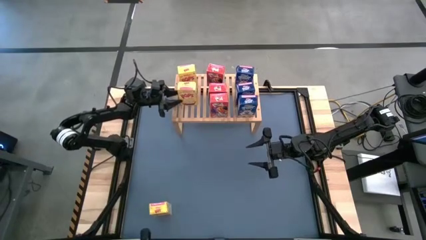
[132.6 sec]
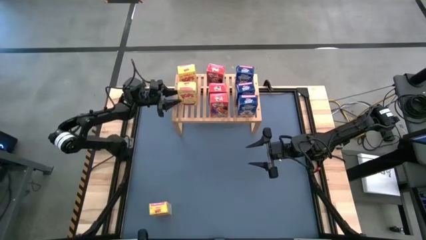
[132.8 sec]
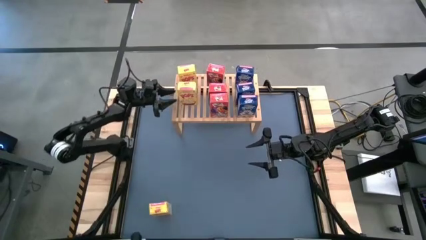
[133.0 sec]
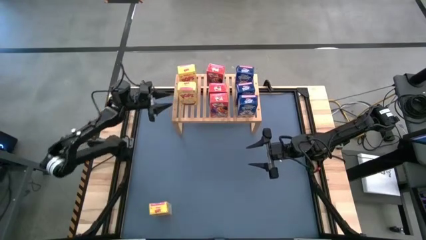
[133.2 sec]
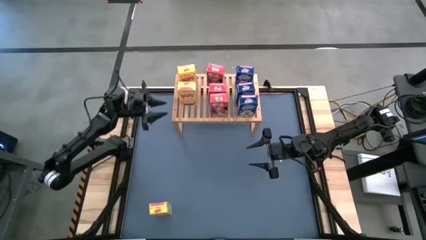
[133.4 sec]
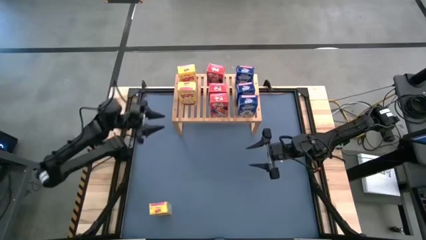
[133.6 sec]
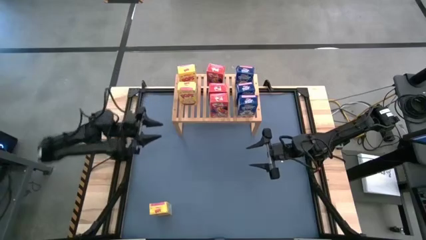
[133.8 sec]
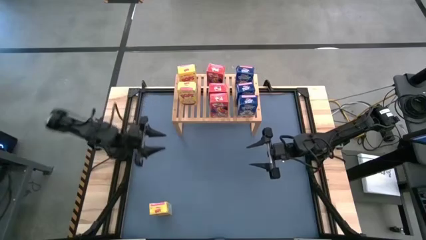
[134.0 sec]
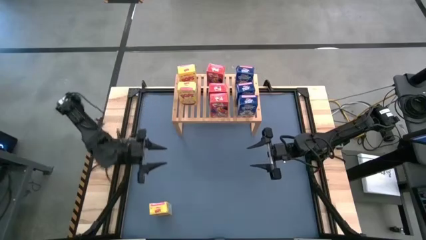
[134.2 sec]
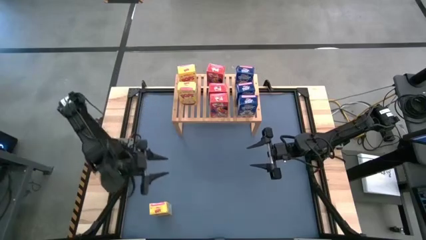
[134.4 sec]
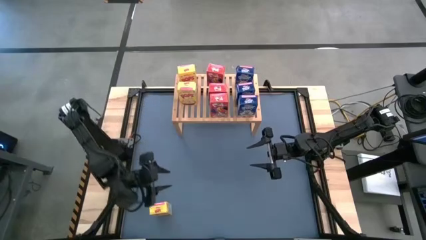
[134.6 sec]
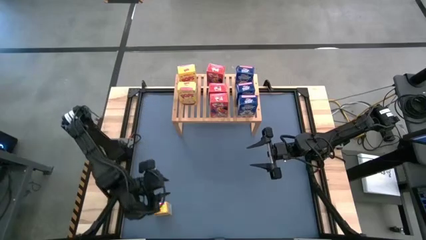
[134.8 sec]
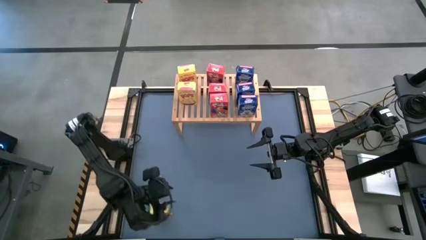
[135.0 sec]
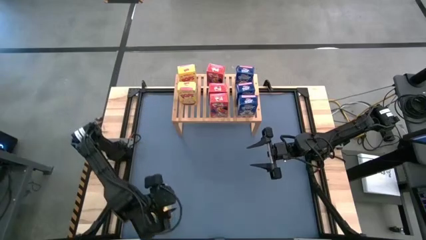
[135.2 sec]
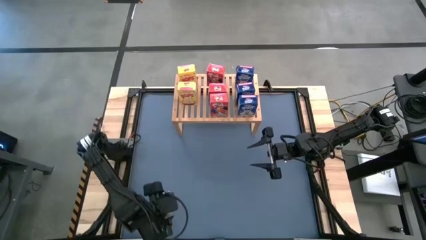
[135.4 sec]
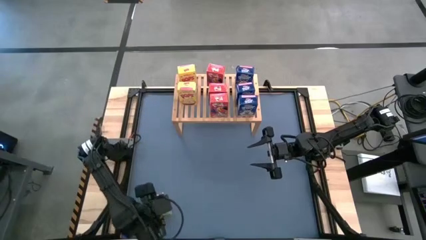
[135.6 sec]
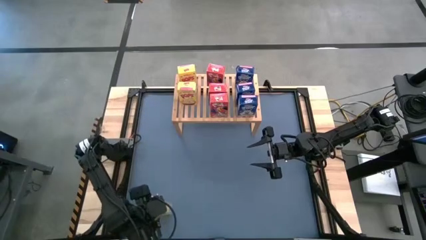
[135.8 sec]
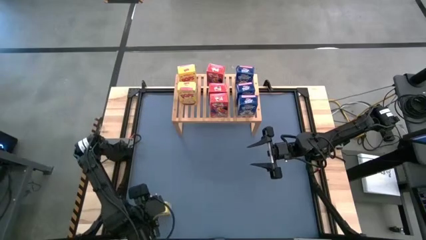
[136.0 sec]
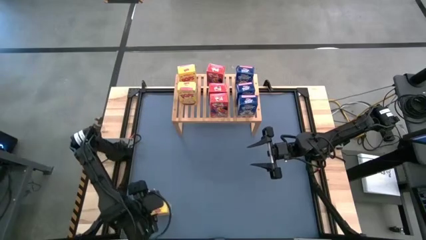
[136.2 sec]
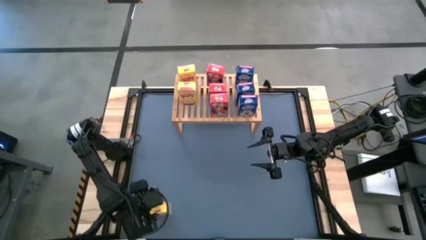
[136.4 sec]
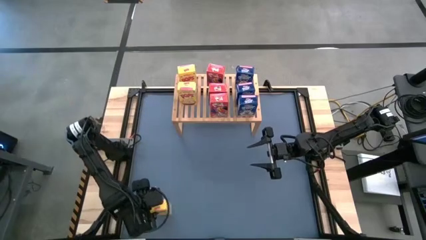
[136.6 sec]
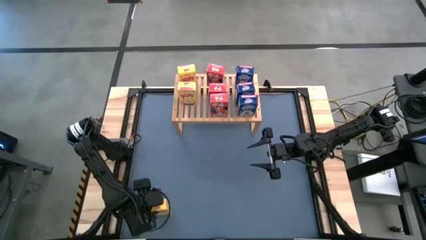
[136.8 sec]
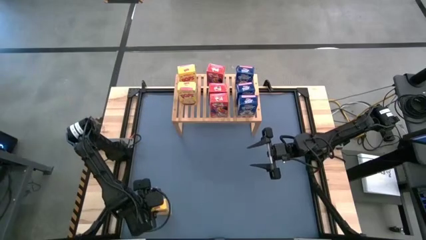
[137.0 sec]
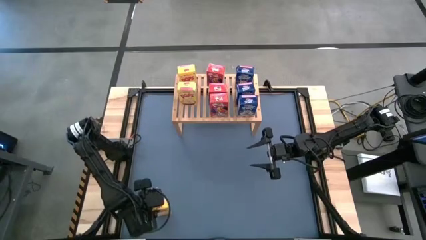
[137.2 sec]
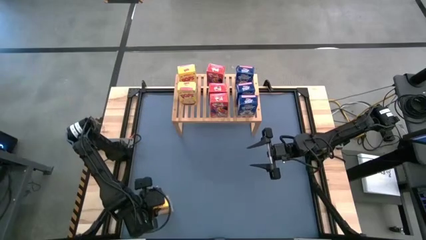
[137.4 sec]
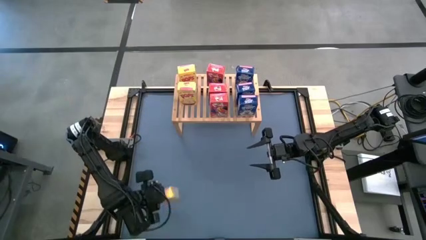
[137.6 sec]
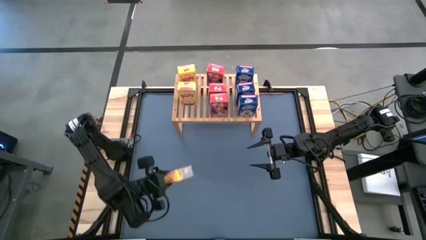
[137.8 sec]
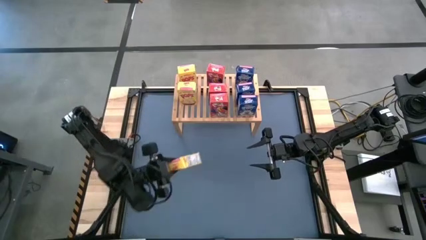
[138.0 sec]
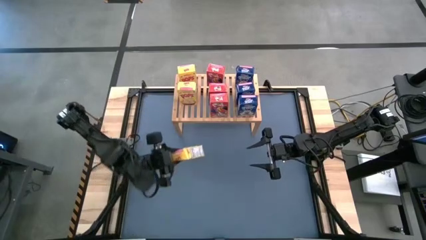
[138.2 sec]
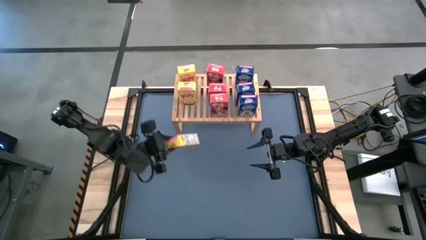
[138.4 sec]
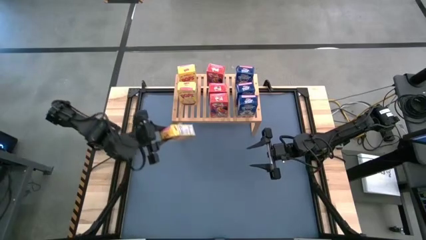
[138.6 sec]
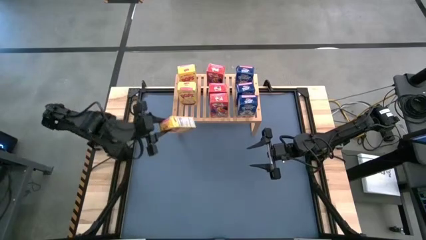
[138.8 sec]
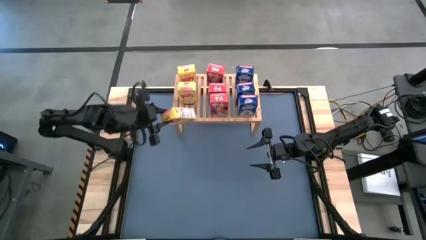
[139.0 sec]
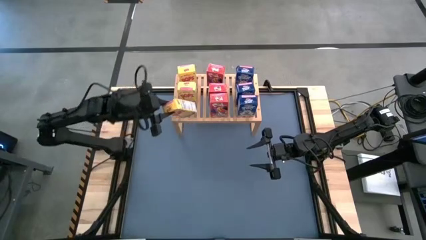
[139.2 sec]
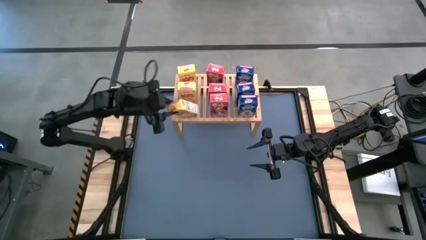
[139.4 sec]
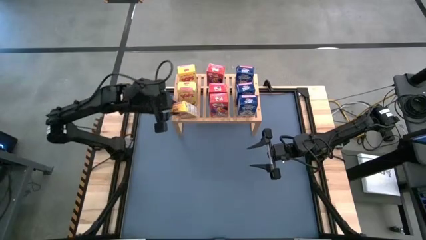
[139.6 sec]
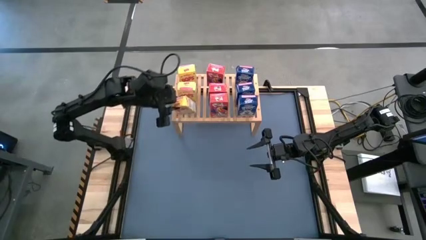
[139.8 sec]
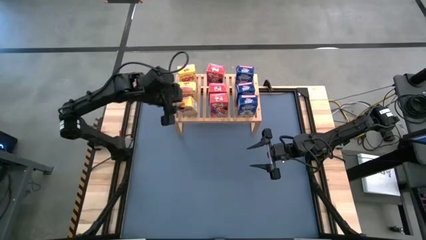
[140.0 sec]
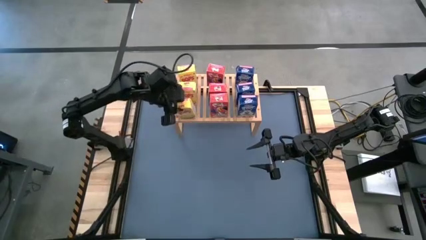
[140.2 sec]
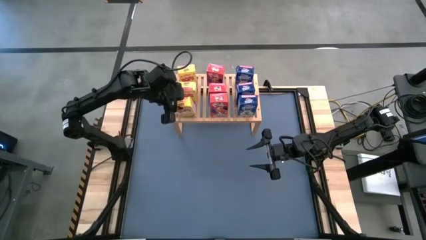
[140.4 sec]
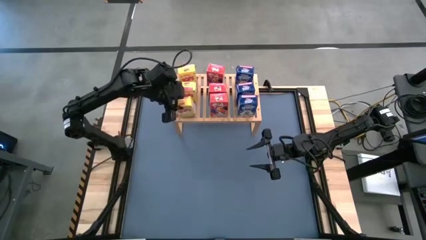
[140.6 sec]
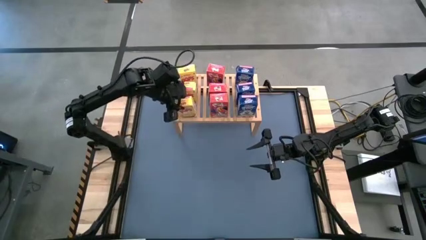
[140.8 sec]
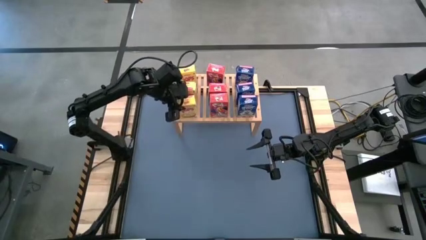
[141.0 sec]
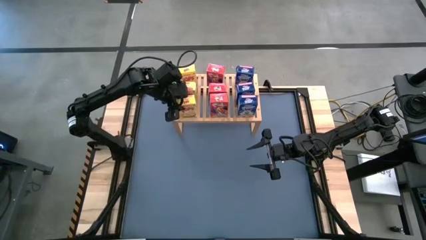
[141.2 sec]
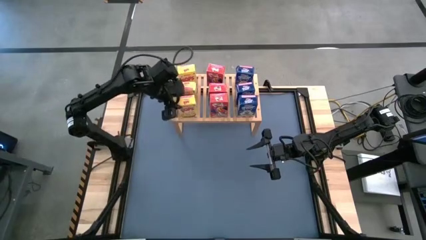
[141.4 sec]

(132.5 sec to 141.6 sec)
Task: Stack cereal on shelf
Put the yellow cereal box on the shelf aligned with the other yellow cereal box

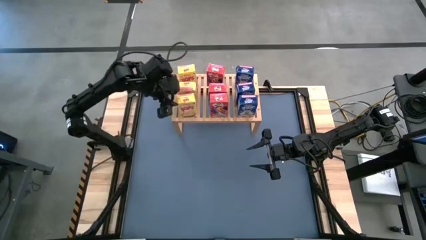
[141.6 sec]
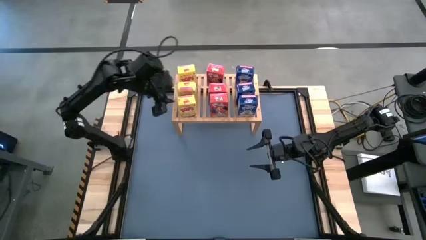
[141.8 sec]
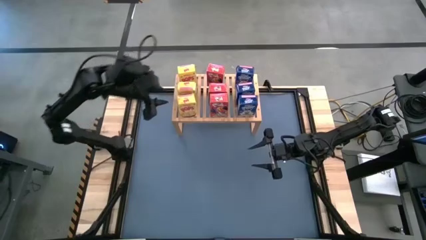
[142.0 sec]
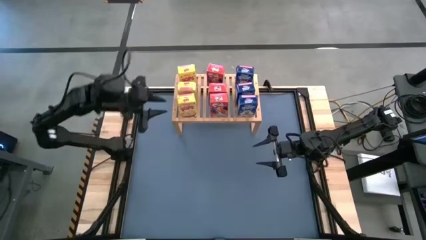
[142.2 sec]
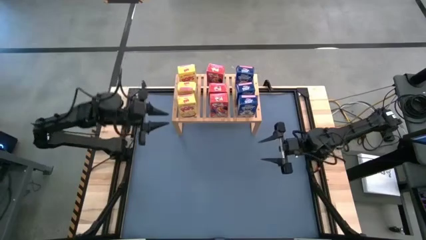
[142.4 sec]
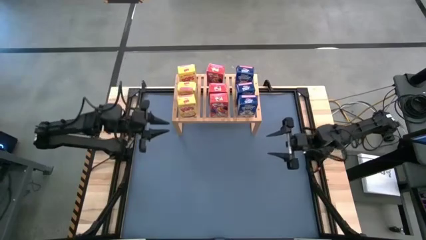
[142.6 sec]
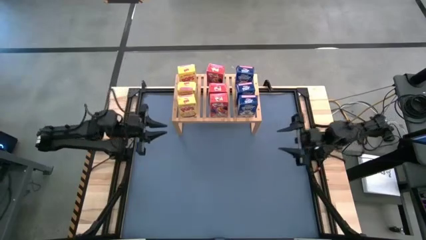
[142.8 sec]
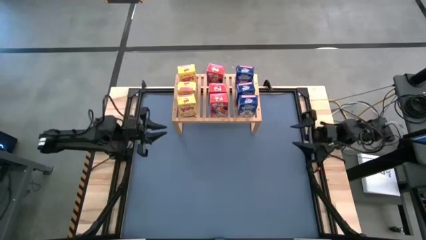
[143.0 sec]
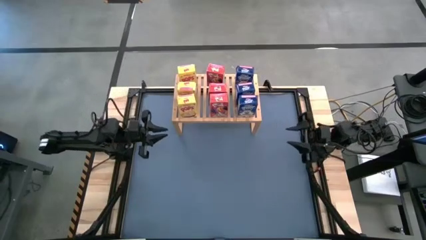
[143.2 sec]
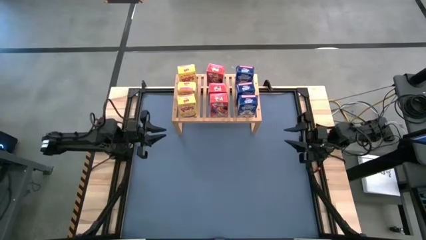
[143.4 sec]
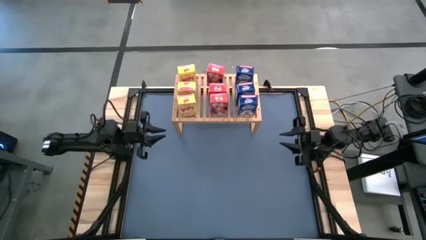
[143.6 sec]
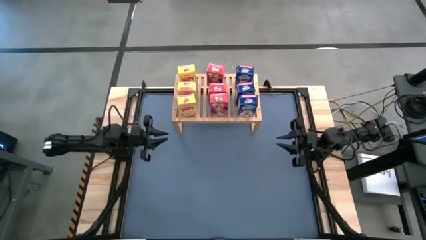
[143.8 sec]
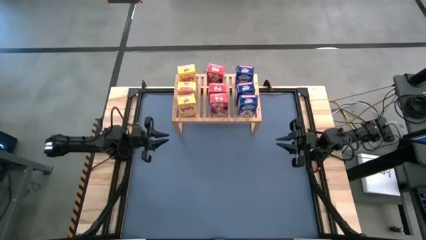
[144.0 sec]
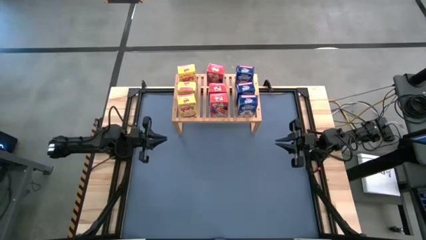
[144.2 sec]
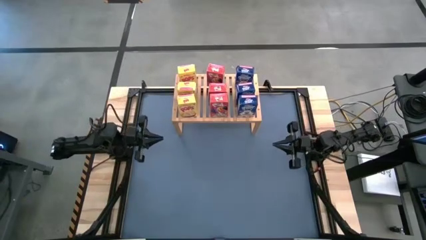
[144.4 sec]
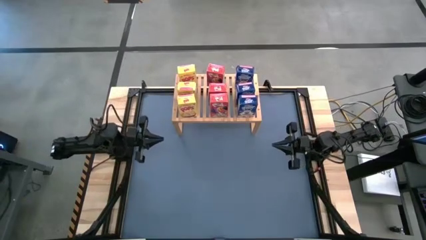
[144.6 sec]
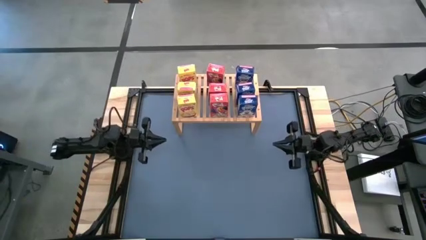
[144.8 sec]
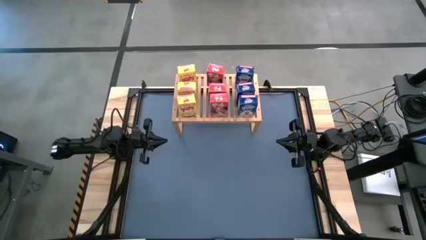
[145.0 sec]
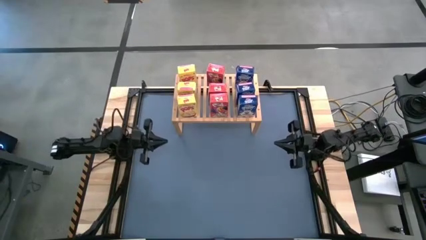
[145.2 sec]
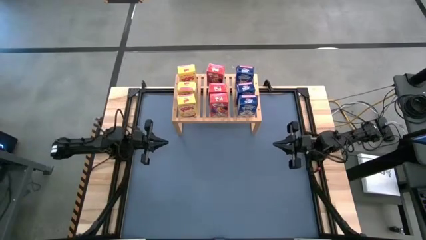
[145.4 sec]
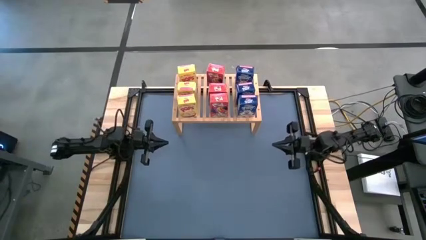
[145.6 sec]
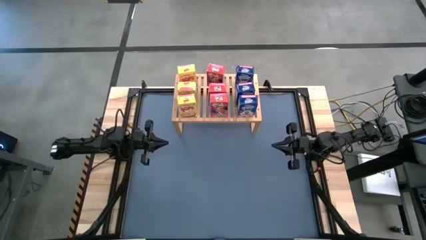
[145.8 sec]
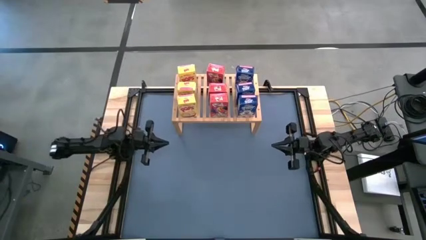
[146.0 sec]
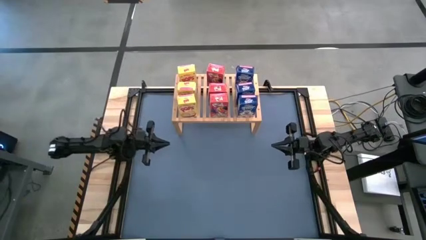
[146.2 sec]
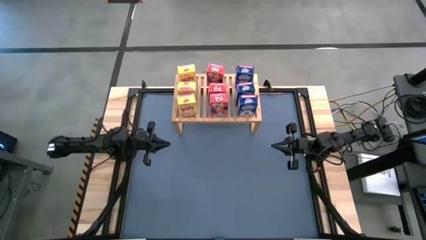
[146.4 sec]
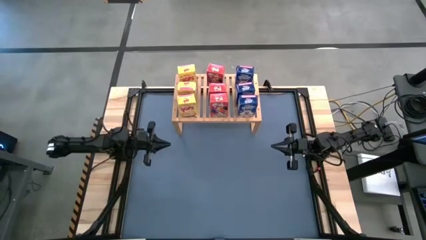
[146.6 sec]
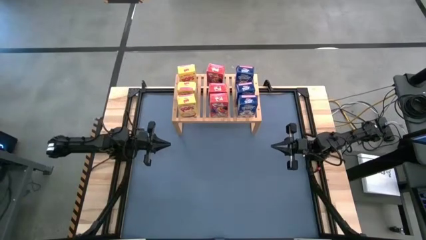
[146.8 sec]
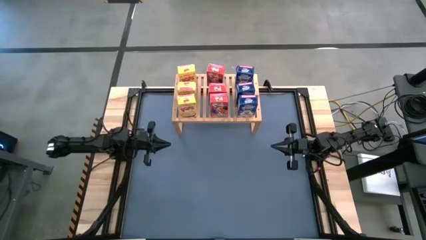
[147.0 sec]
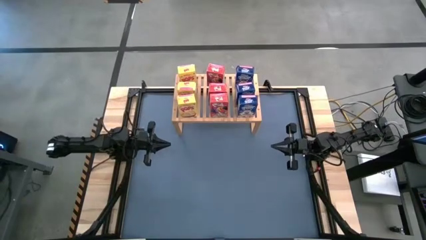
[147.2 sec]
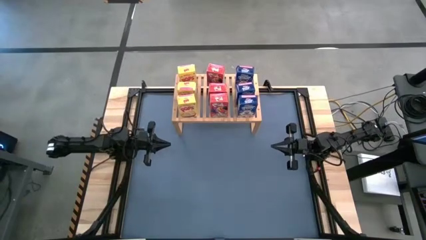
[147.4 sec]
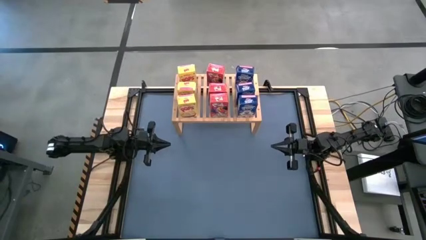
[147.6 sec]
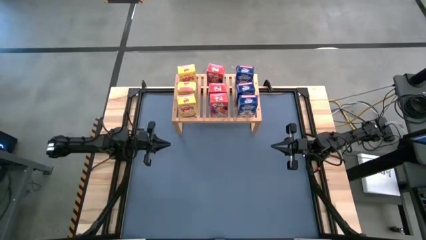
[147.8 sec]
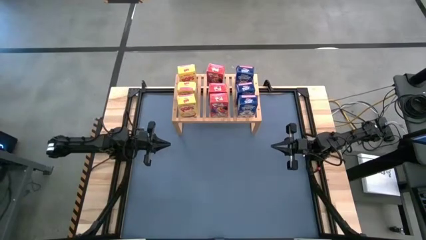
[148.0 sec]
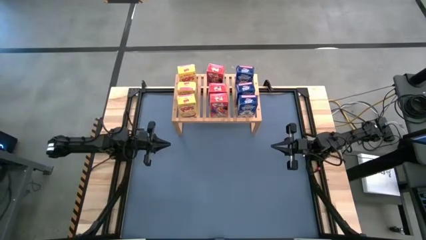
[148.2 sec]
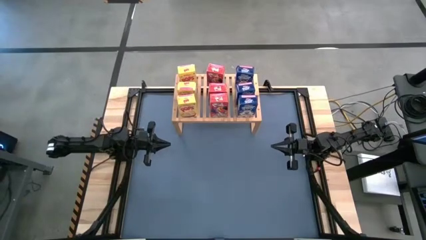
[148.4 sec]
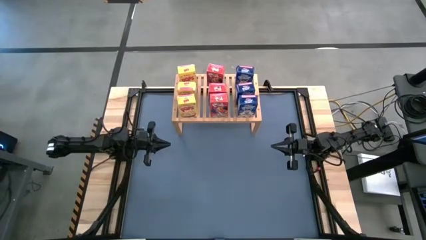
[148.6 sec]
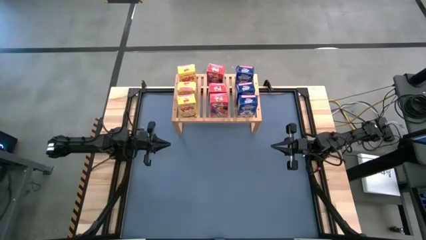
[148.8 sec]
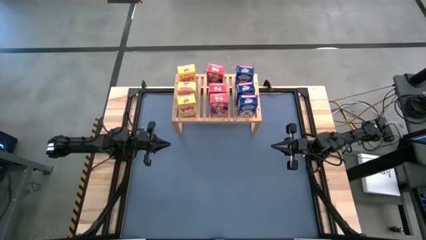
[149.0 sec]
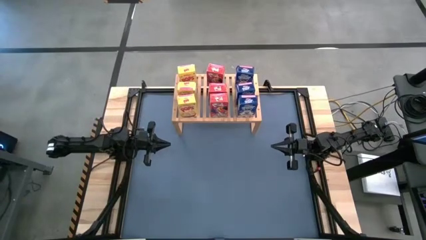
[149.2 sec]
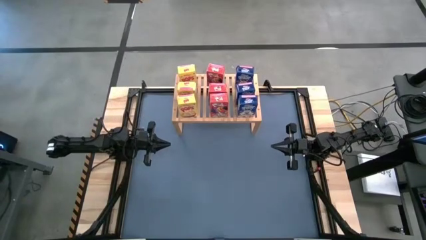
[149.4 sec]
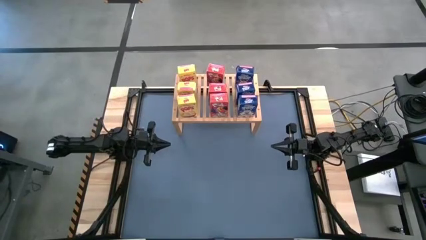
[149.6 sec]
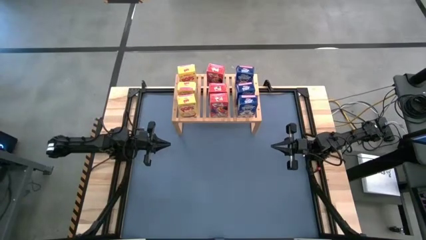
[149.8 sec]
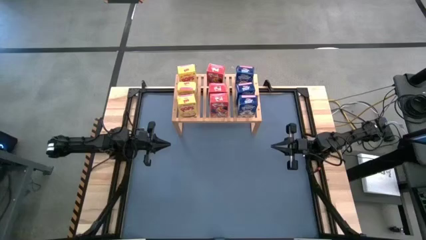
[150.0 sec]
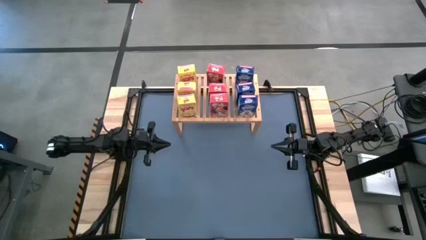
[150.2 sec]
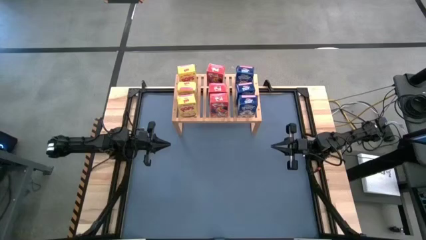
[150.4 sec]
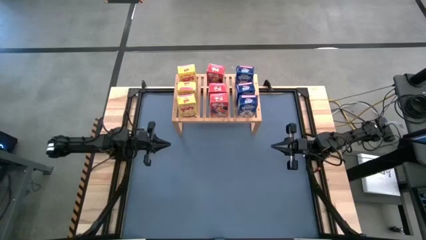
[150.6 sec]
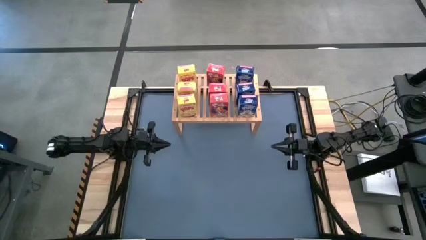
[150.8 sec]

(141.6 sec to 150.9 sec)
Return to Home Position
